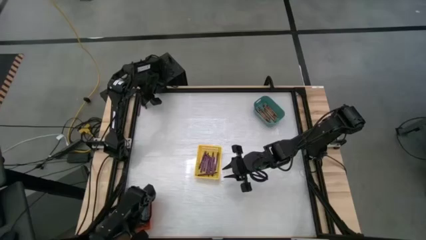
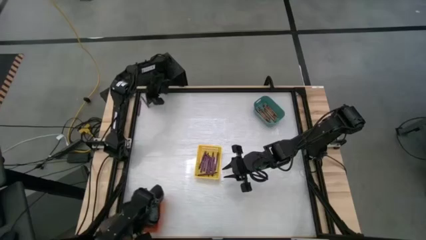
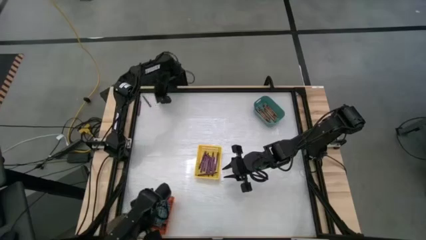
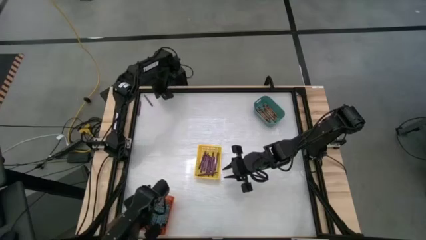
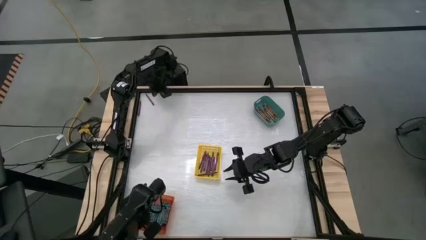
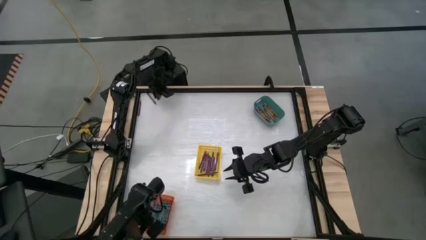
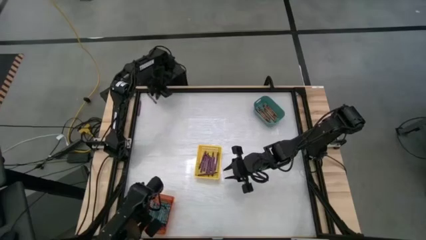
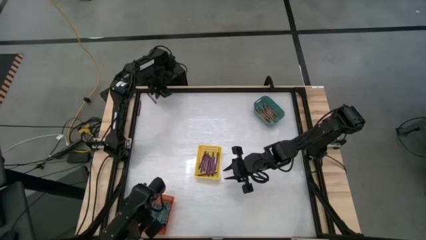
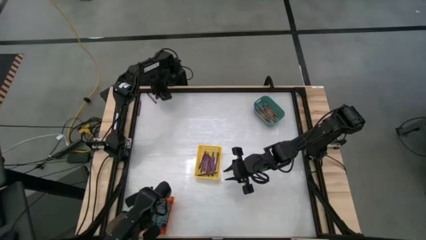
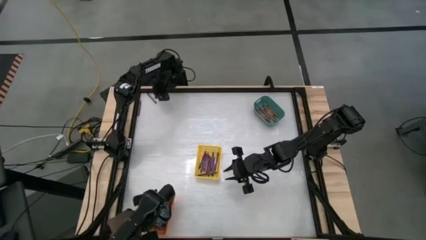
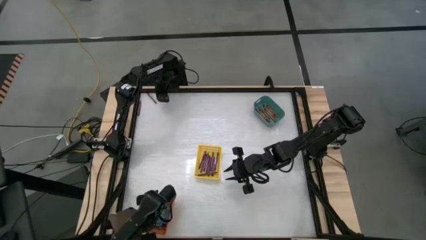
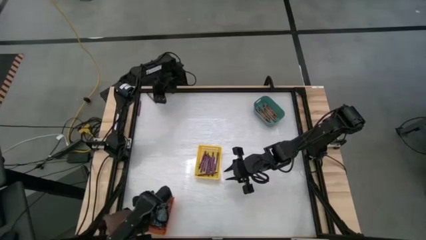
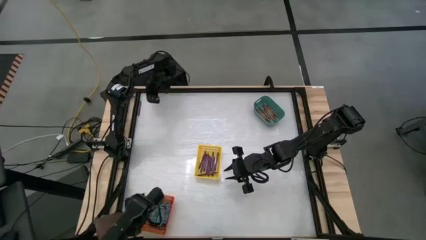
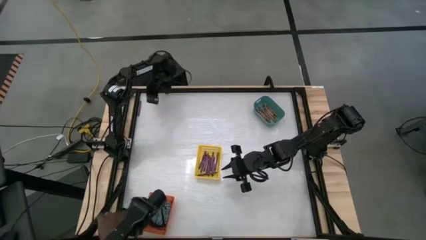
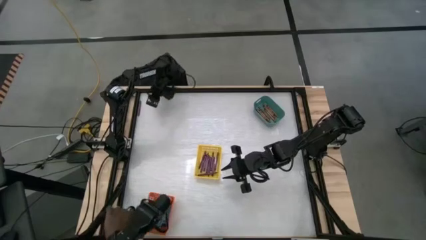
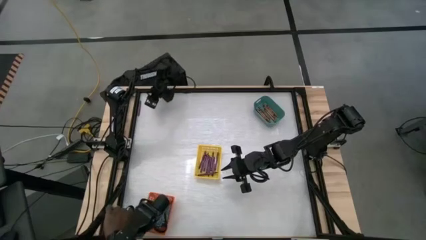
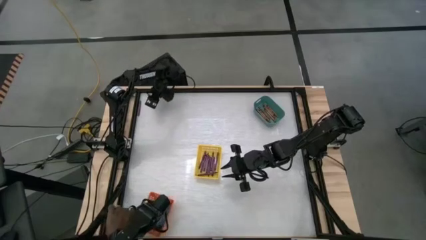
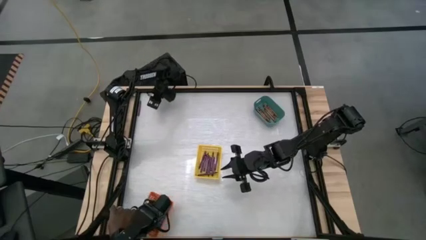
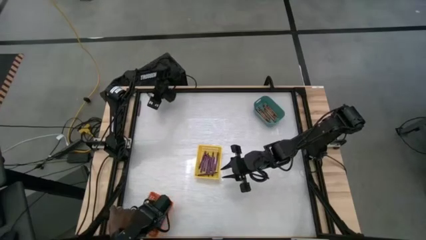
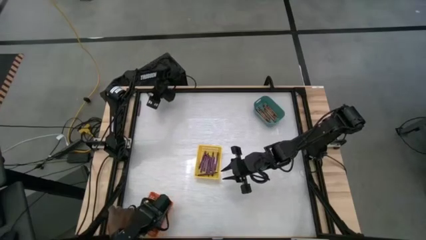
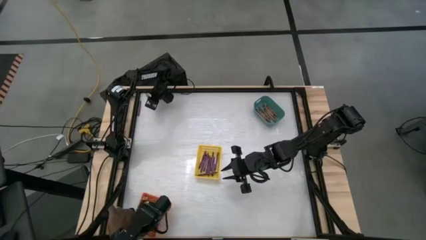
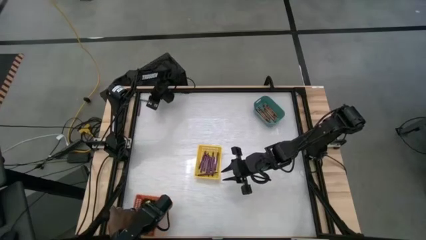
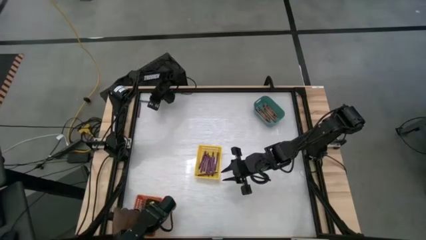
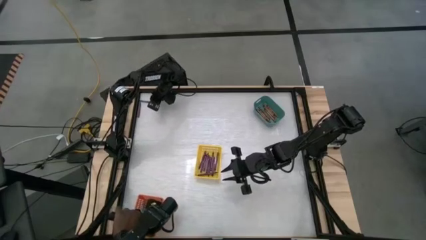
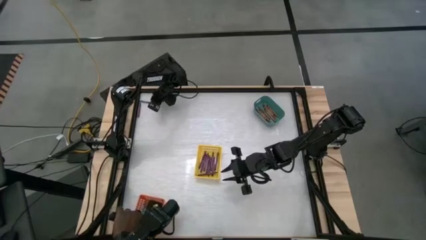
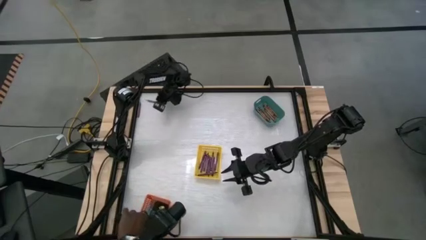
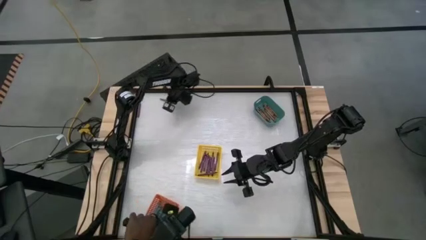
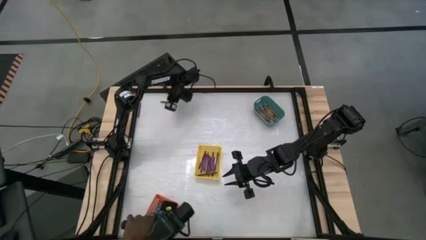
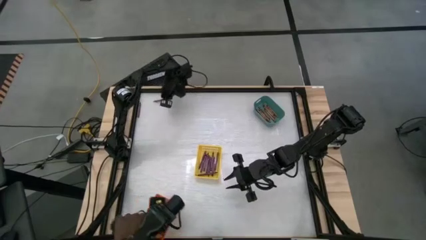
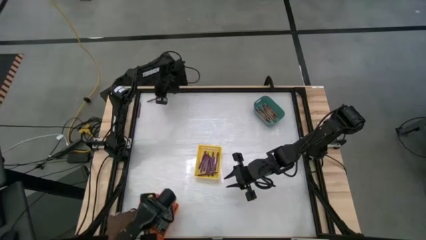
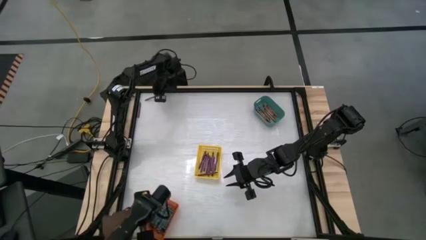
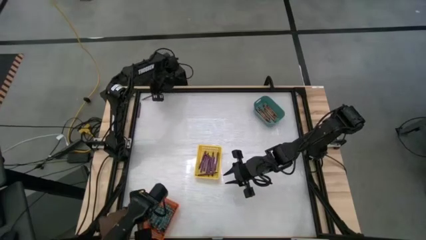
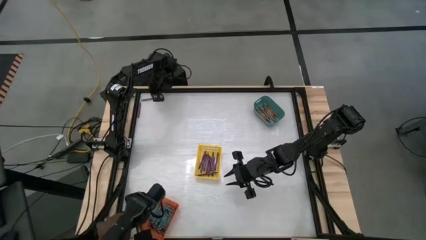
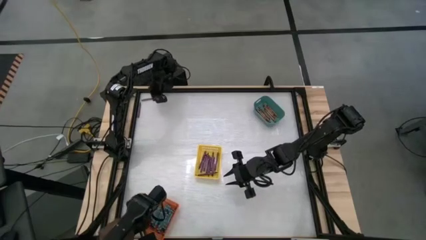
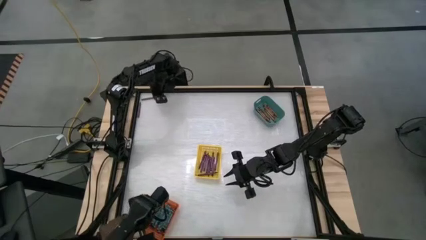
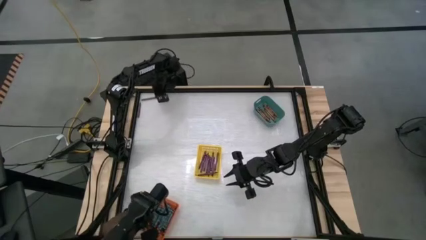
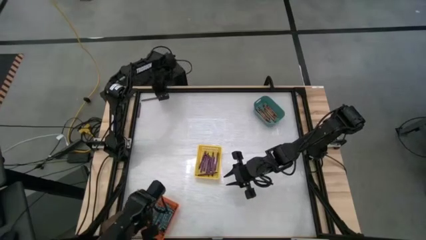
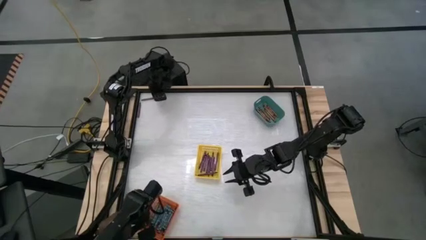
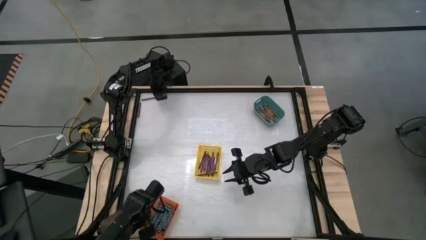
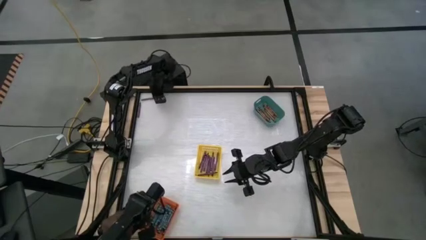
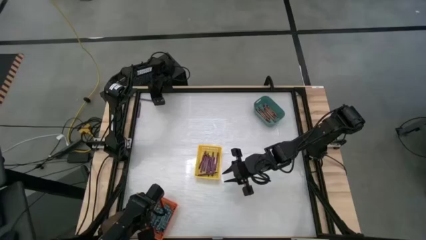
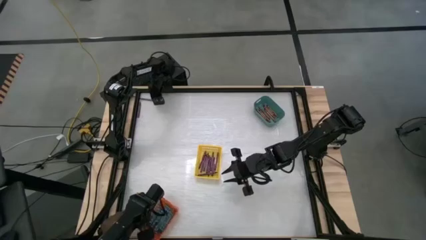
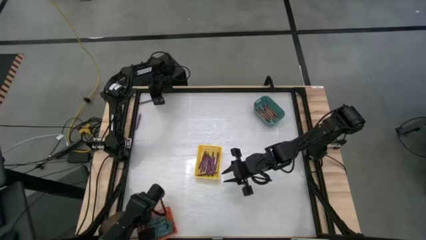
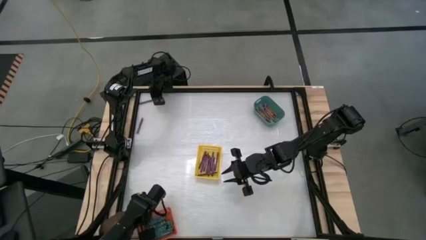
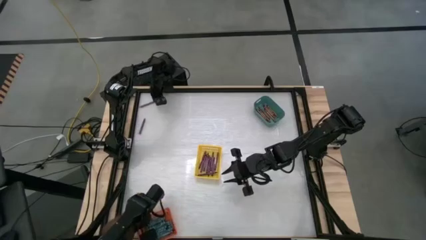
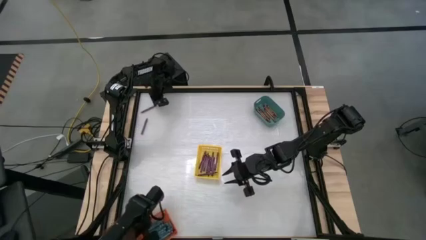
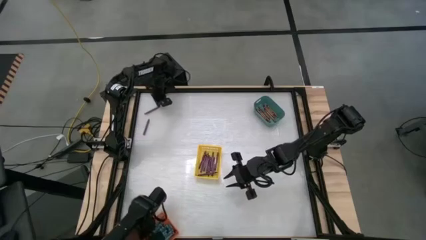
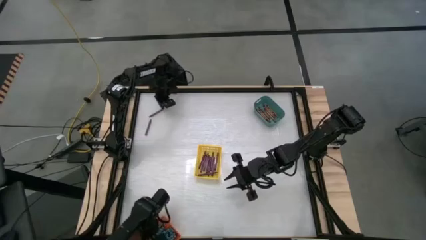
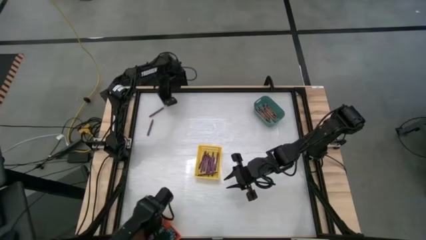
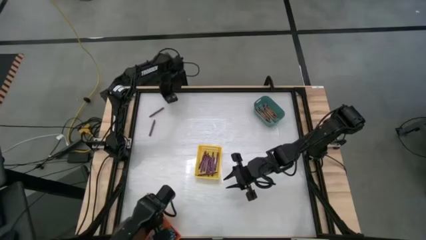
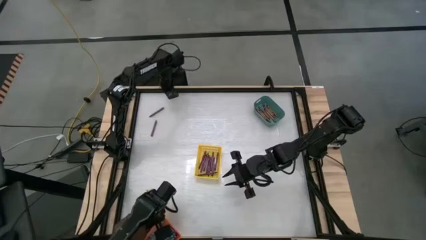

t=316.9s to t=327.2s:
Task: Sort crayons
Put the violet crayon into the yellow basket

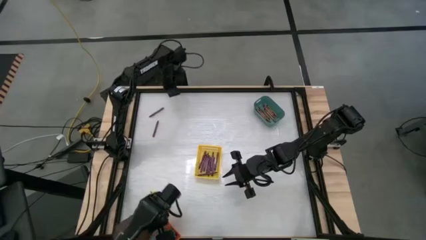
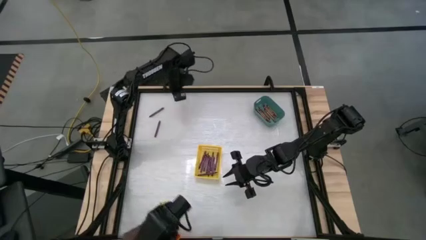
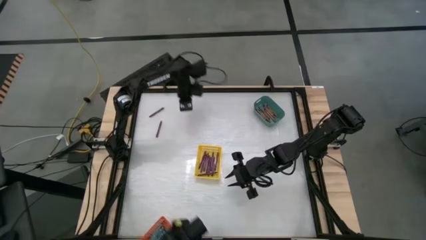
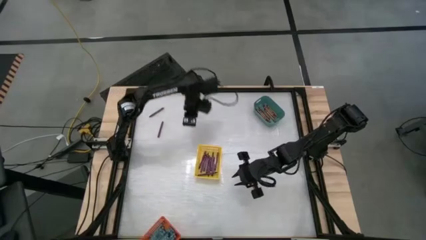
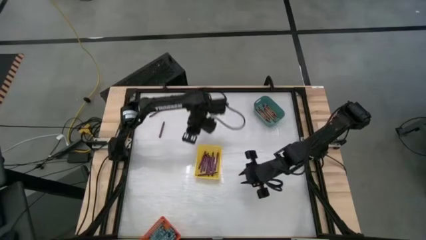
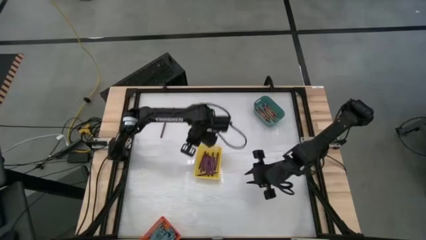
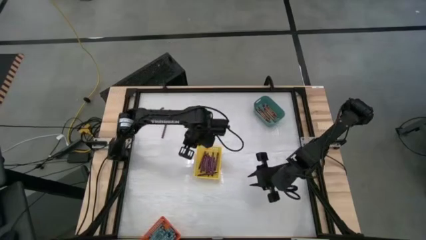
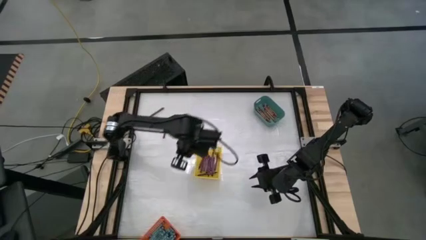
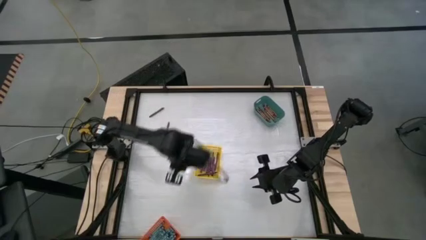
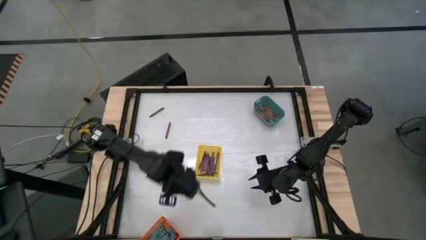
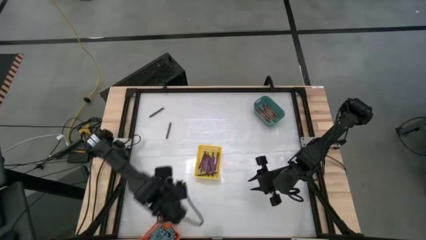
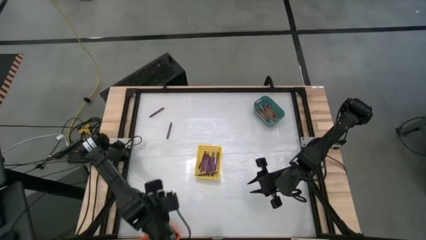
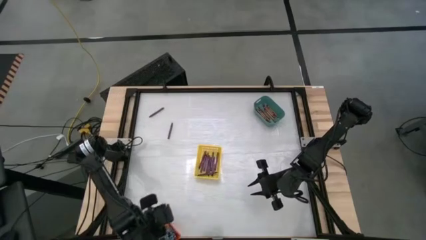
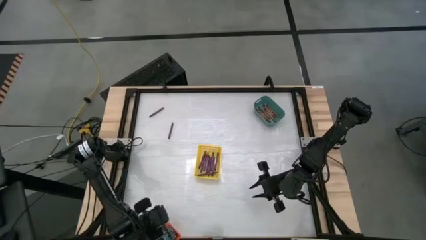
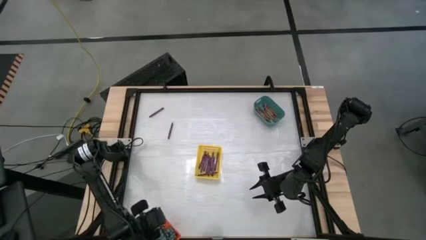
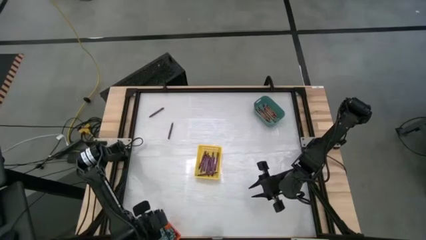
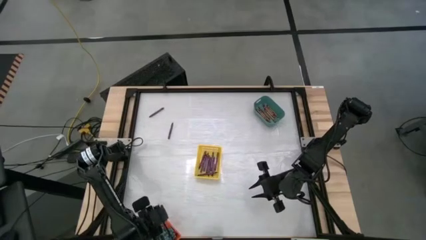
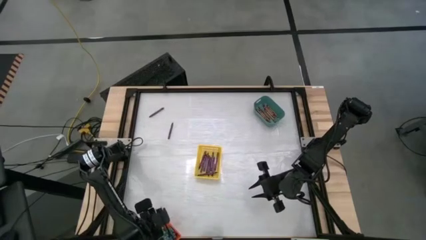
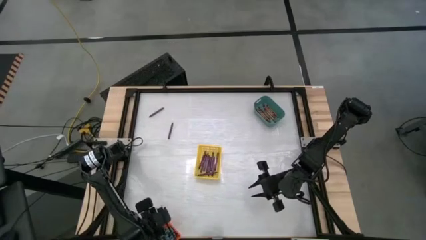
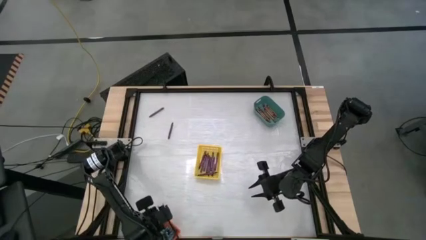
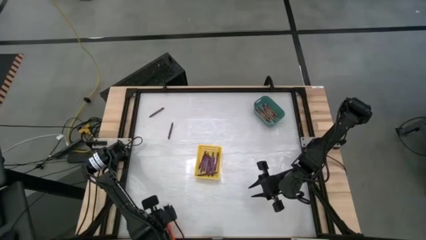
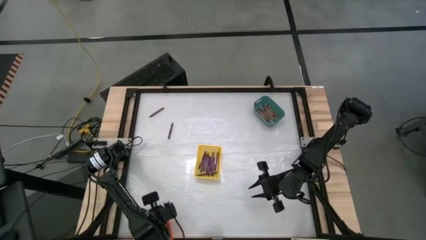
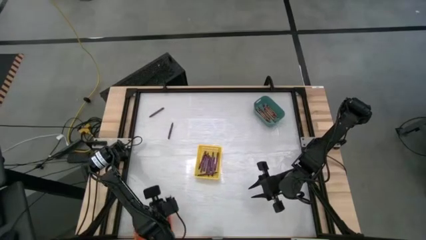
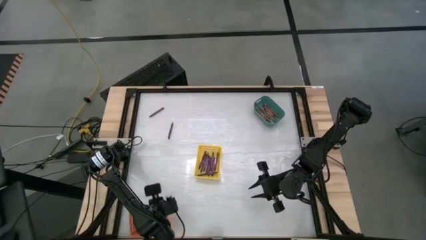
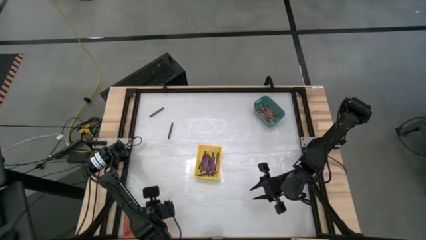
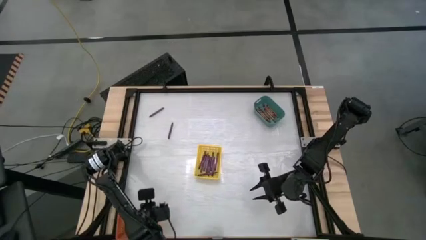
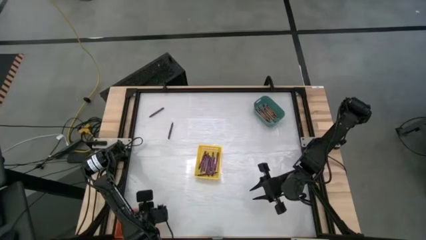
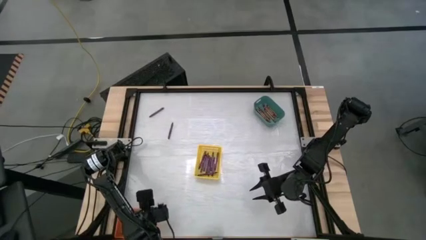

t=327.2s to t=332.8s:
Adjust the orange bin

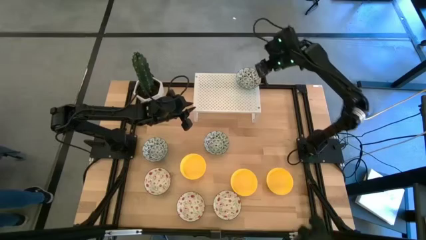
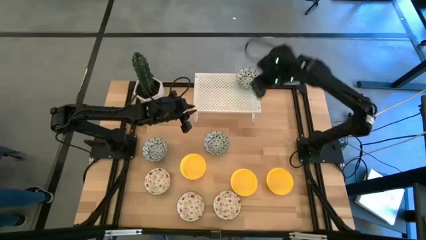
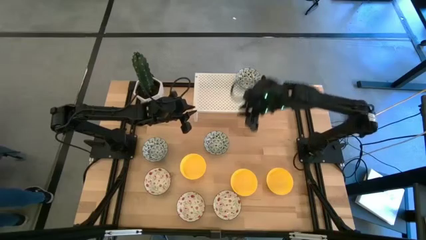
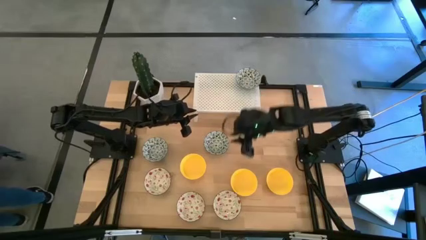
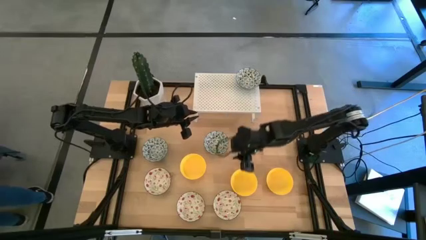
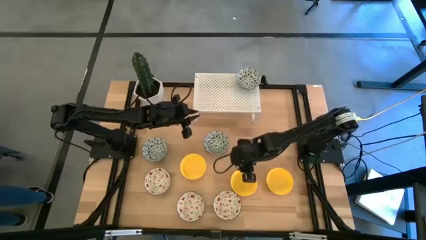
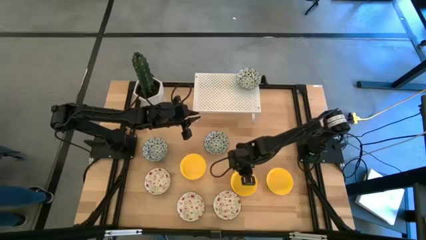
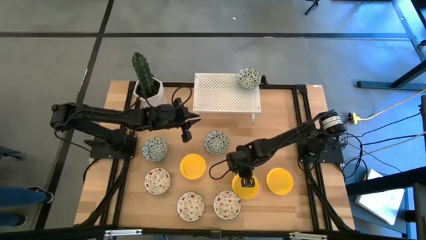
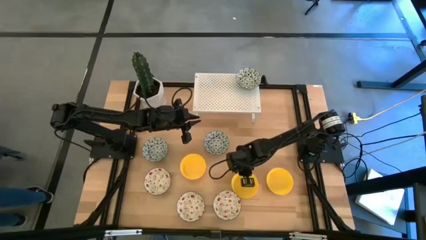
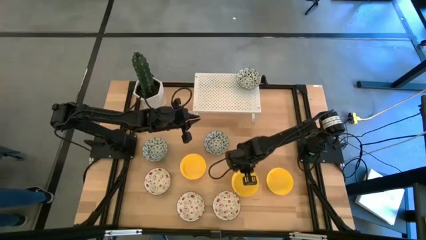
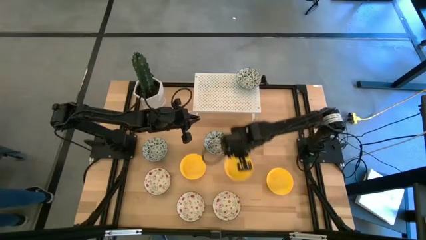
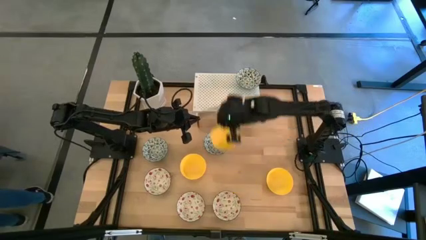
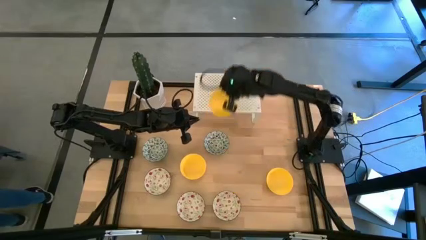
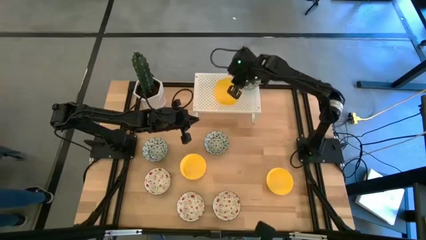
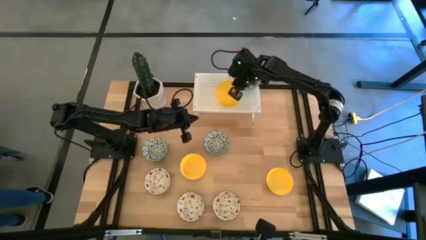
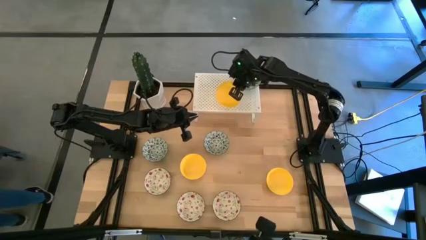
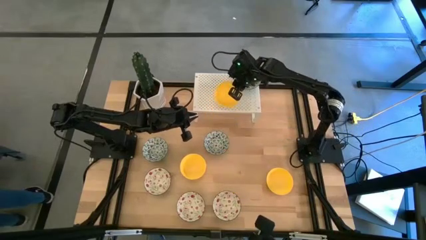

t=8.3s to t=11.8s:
Task: Pick & Place Mini bowls
Put the middle yellow bowl on the shelf
